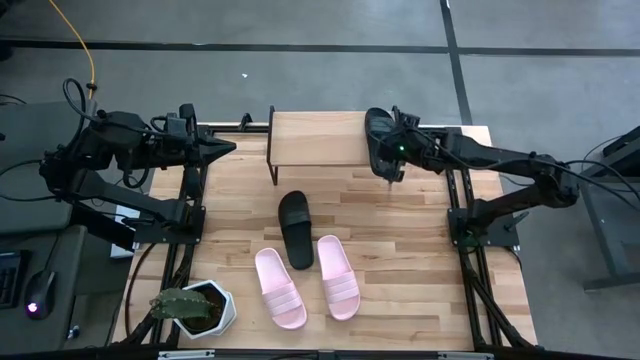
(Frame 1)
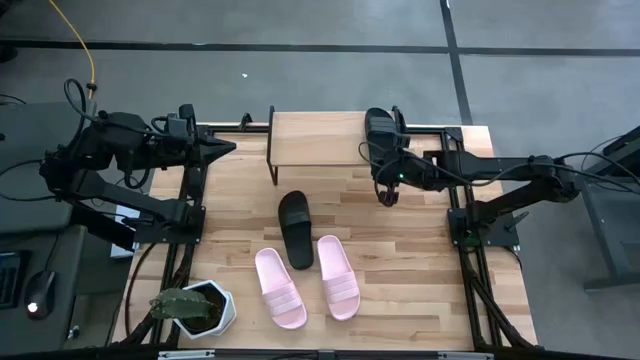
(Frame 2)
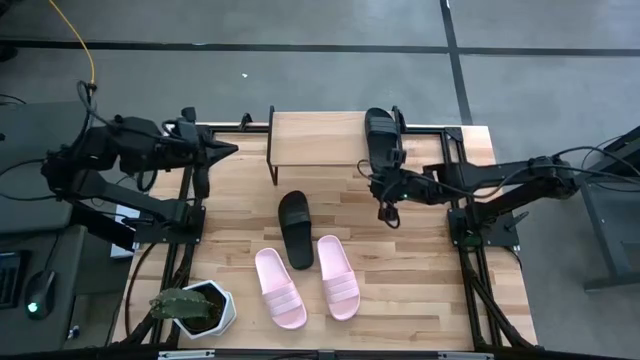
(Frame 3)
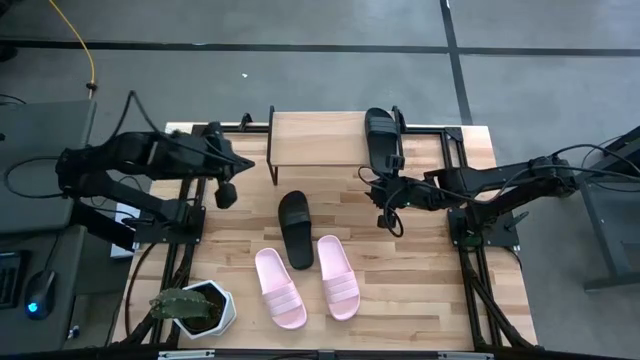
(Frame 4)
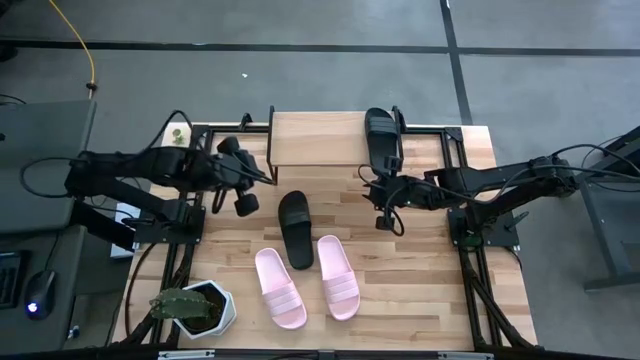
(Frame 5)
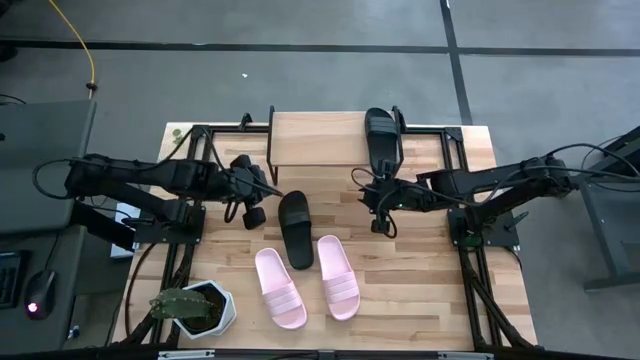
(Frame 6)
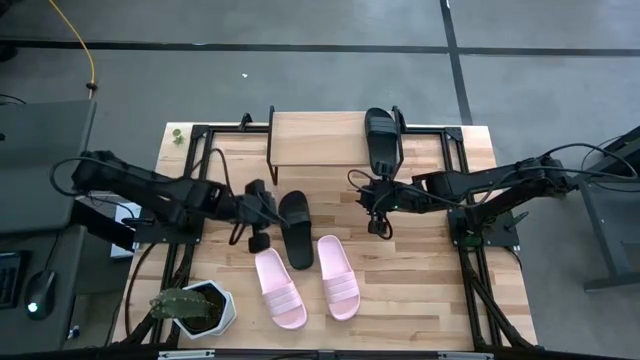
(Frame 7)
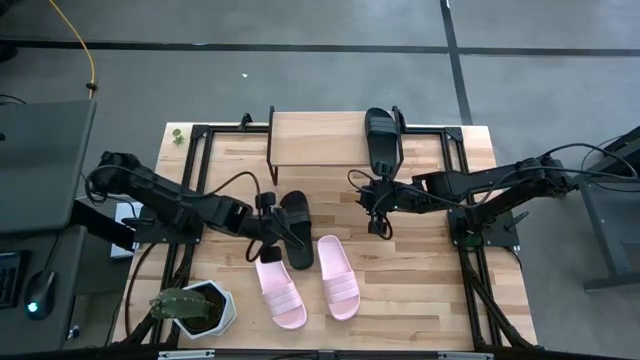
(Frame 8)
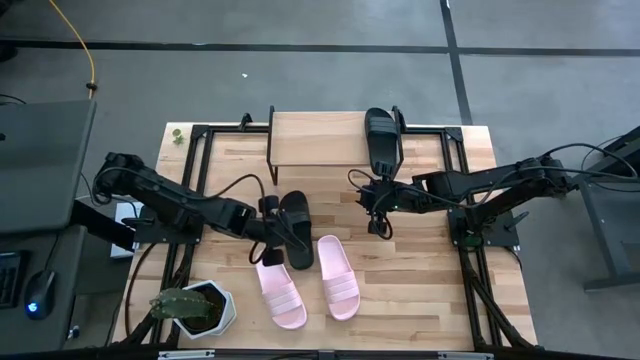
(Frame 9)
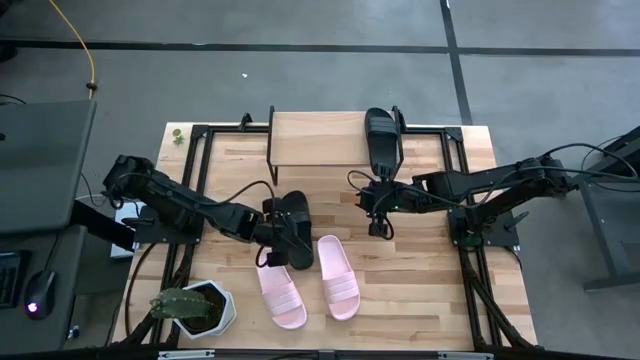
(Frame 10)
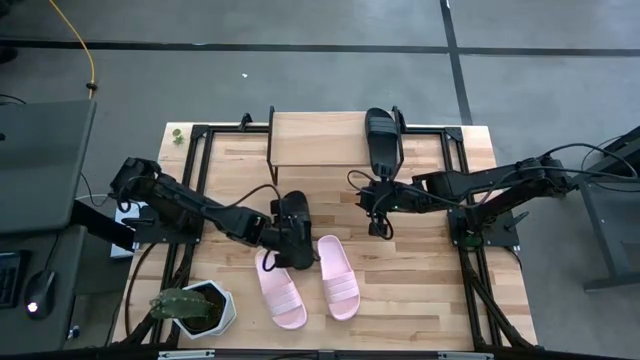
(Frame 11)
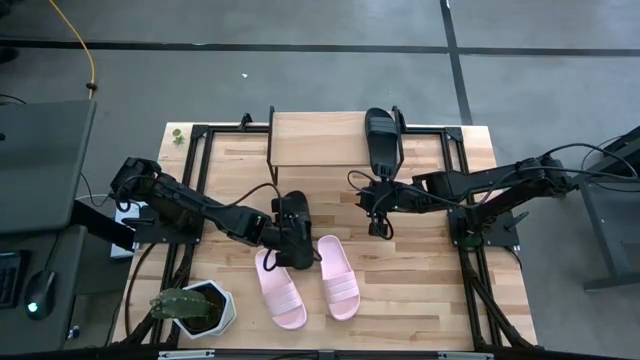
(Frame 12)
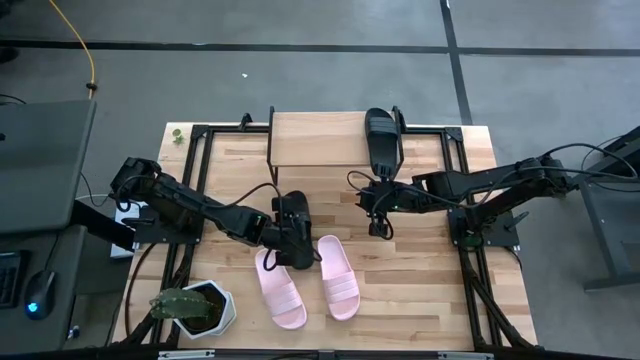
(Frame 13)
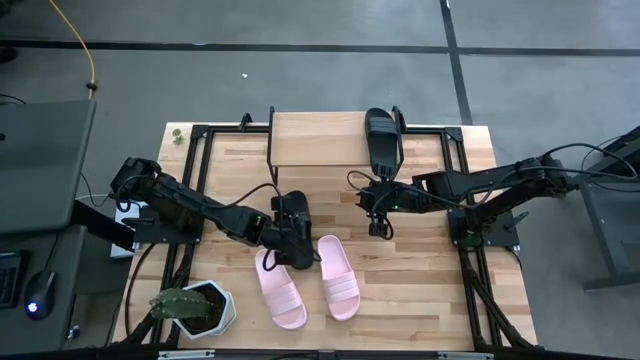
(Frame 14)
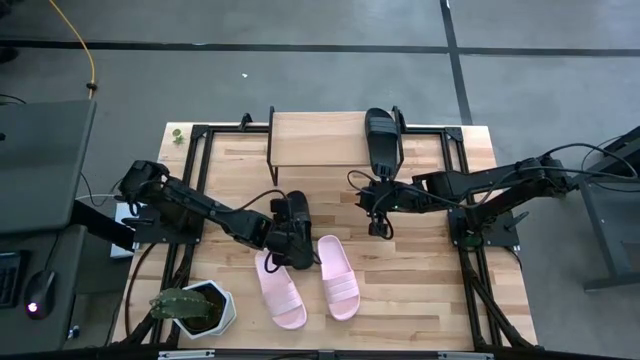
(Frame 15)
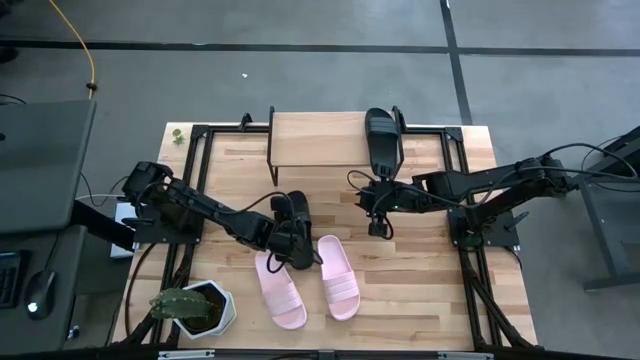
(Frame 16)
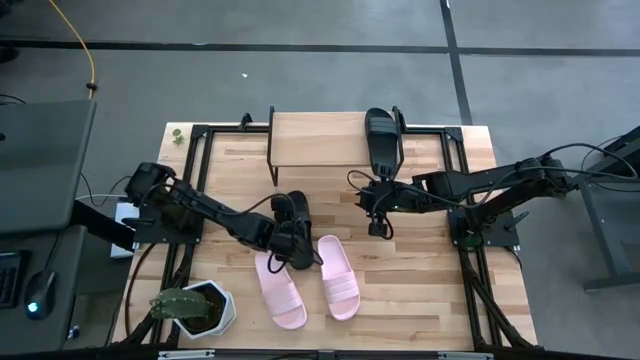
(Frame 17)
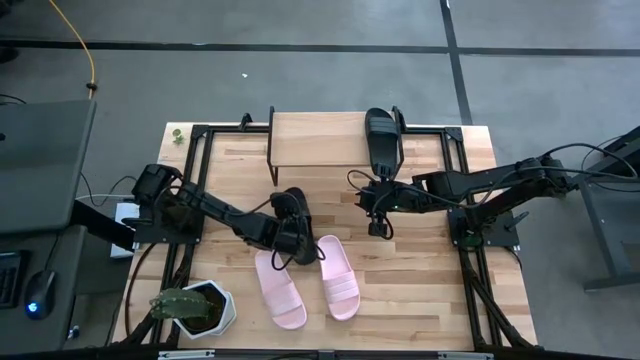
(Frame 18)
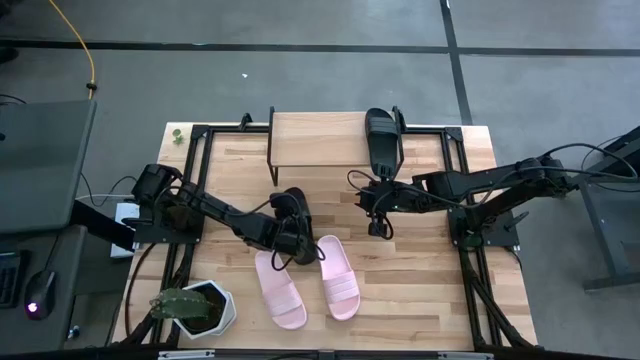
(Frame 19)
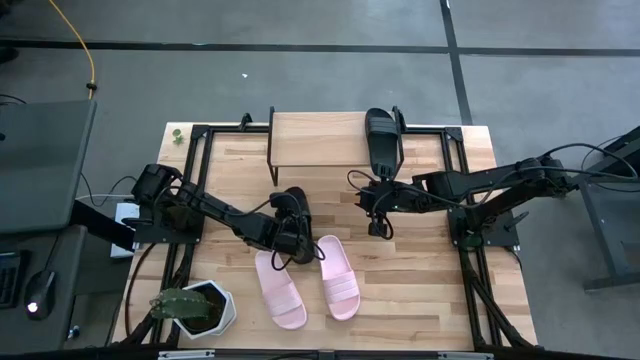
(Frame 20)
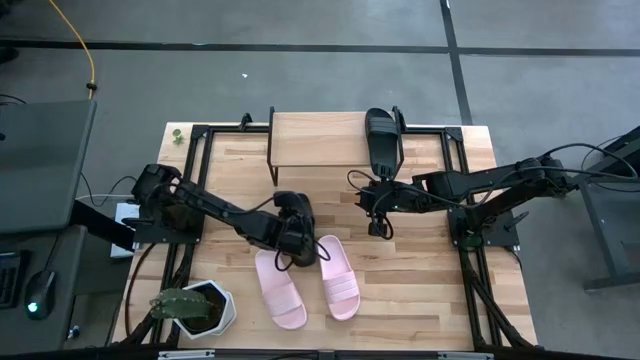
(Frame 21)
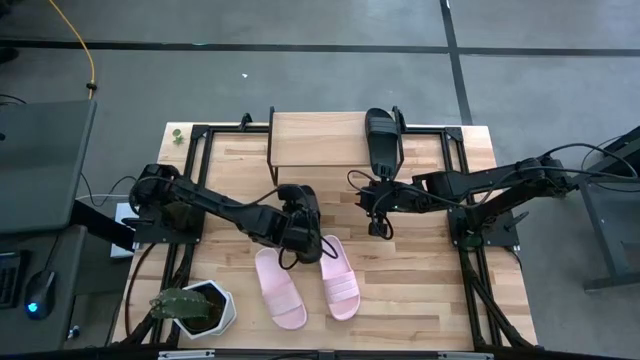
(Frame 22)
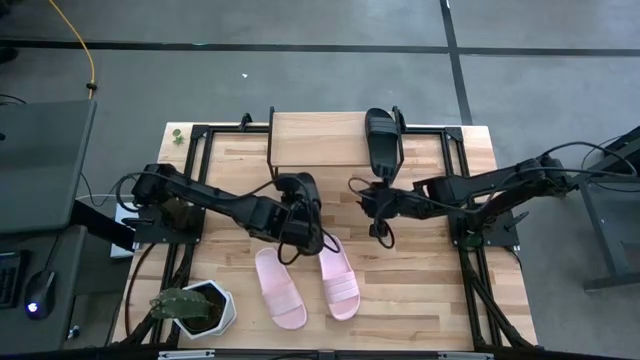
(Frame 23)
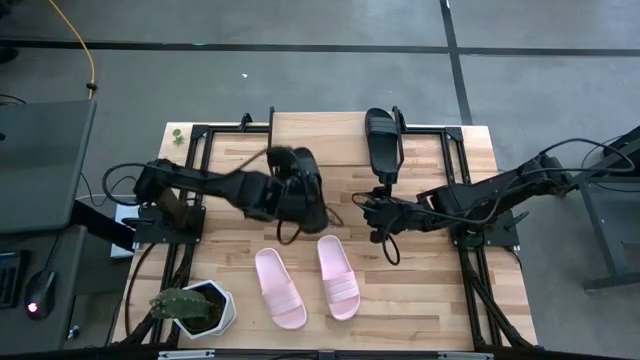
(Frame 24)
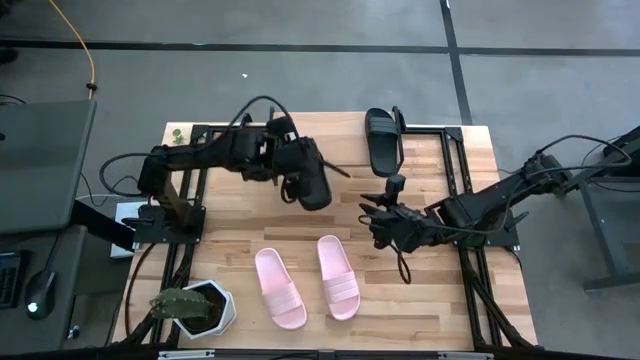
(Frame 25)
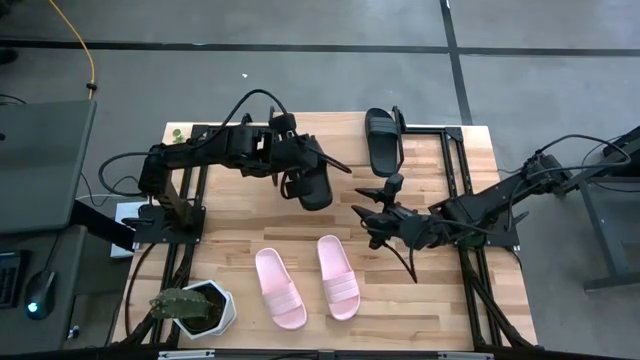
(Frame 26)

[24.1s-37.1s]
Task: Pick and place slides into the shelf
Put the black slide on the shelf

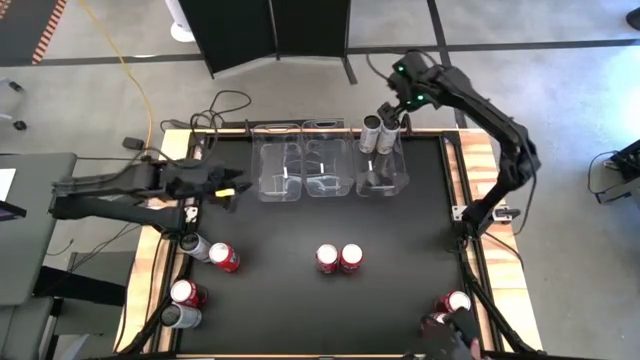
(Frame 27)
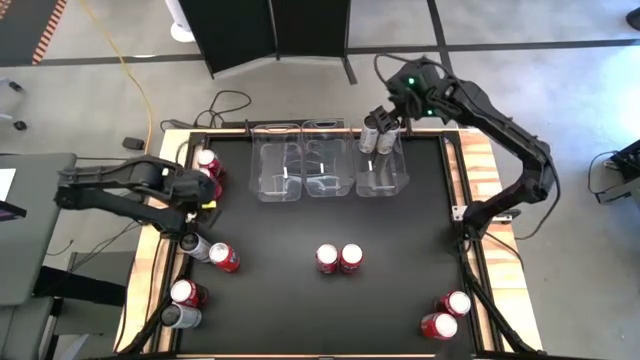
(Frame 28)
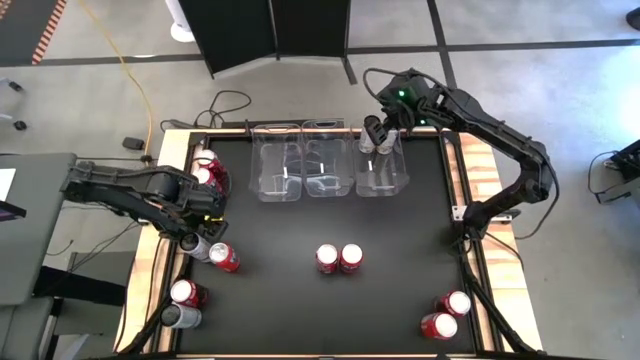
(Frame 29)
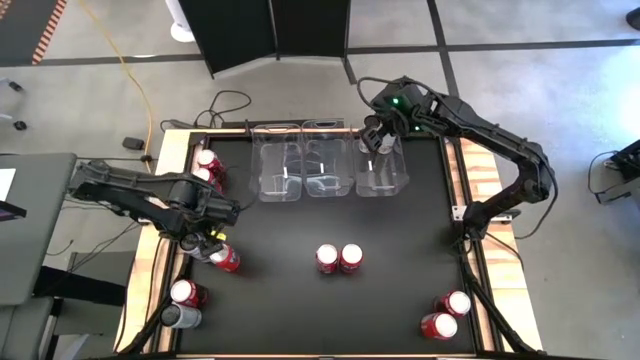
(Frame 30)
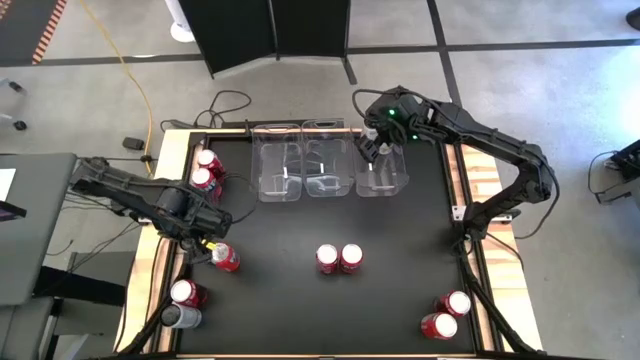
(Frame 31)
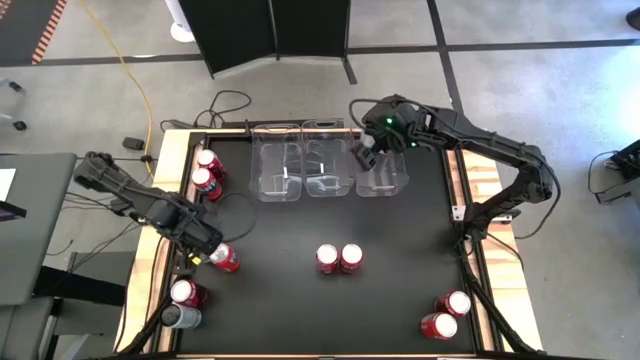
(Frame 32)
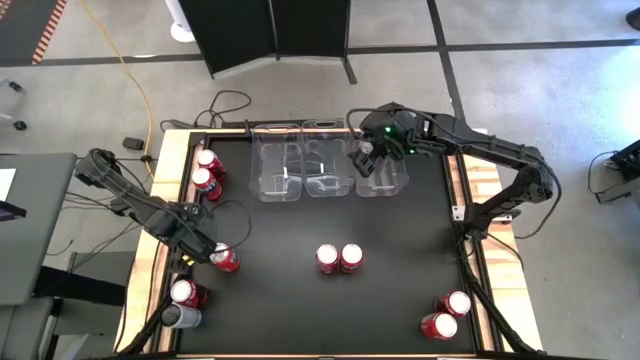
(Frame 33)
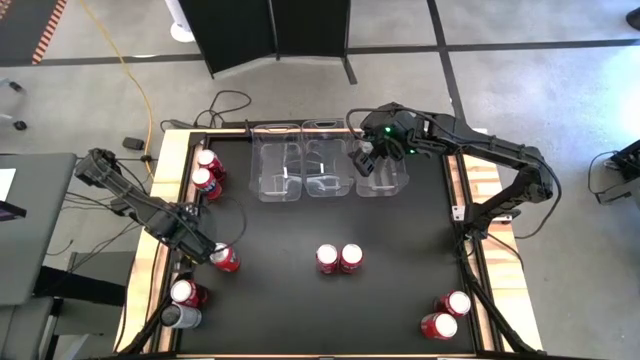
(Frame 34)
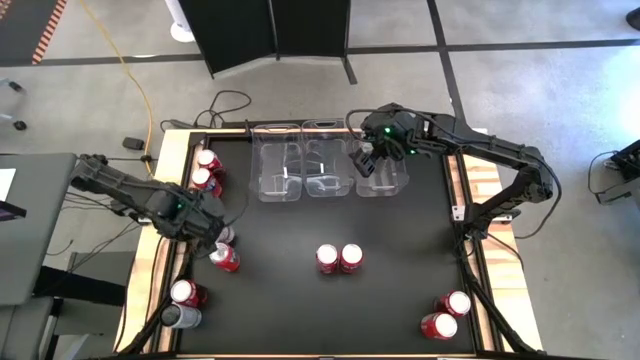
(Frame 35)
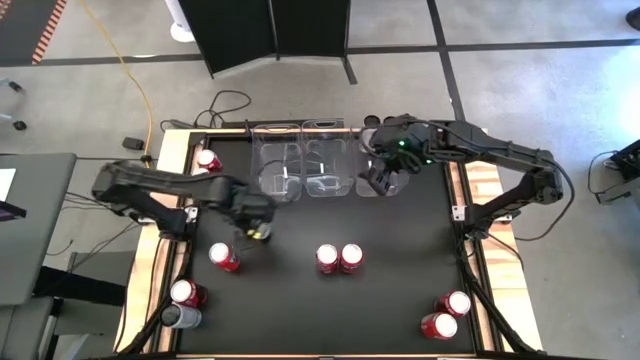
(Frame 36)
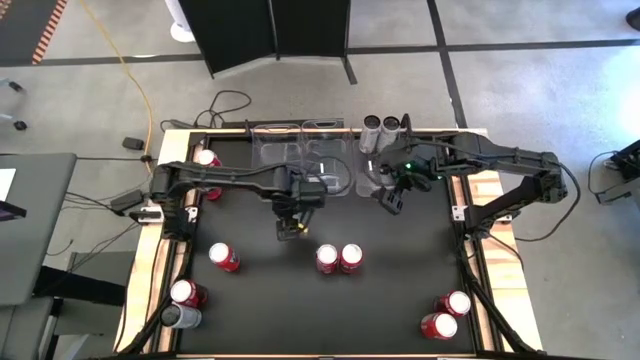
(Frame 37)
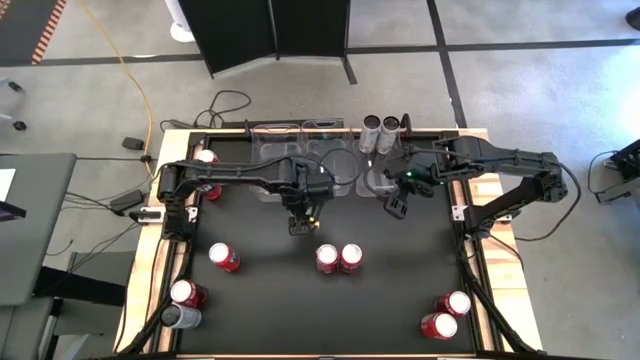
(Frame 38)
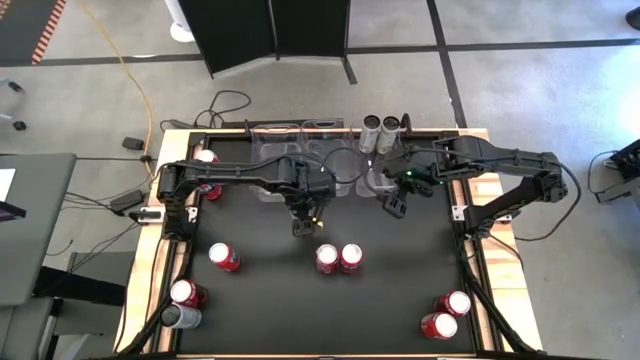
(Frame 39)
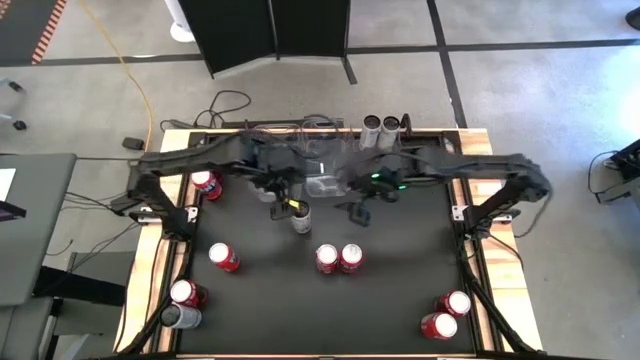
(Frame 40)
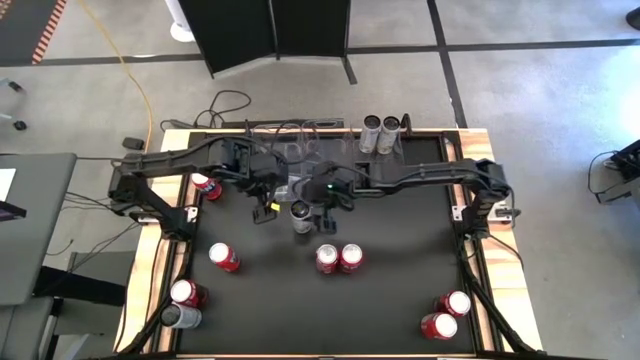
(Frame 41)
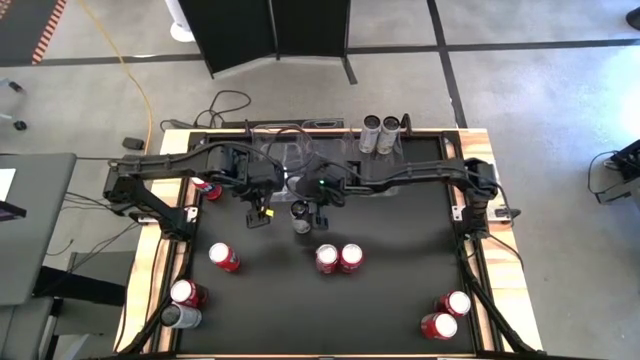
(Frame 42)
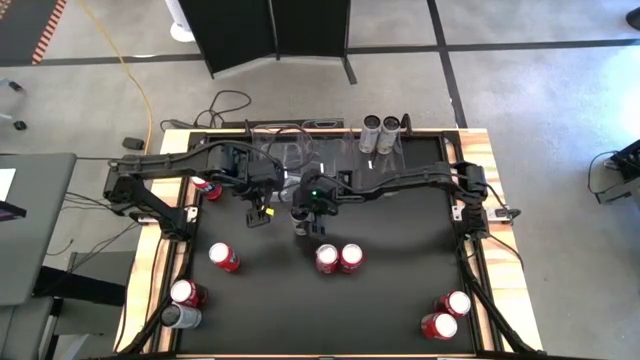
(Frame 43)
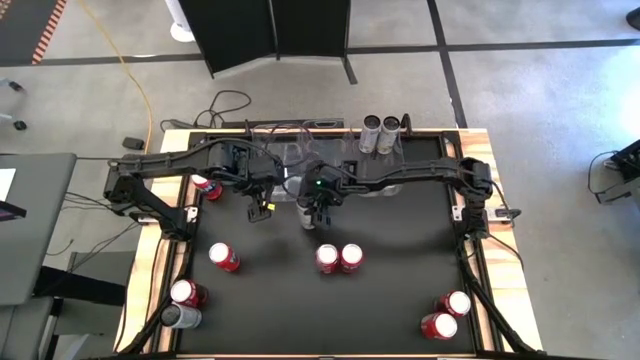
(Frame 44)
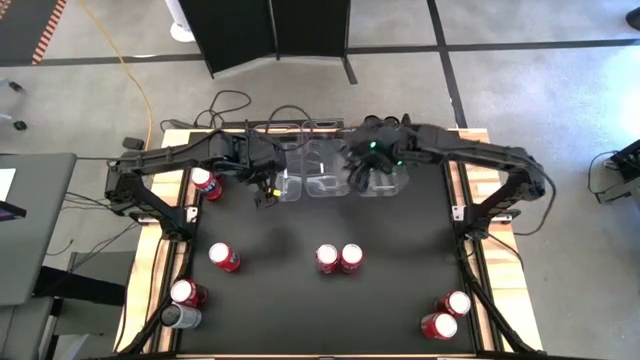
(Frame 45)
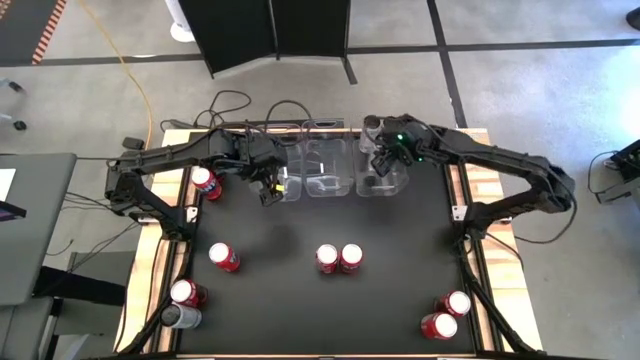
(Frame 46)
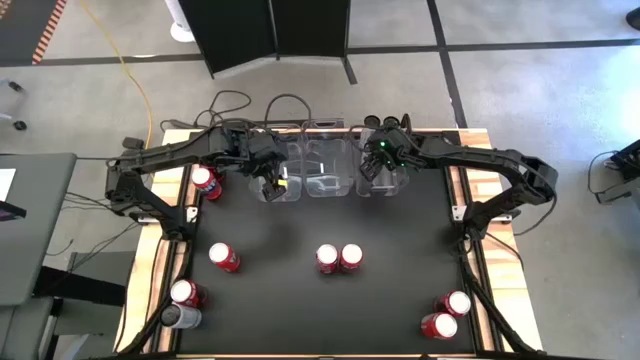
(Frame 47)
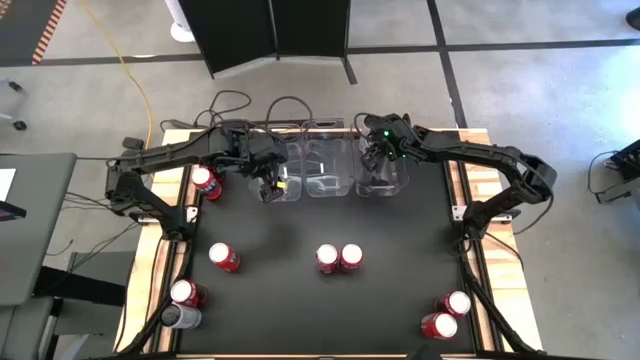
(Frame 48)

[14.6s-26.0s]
Task: Sort soda cans
Put the top white-yellow soda can into the right transparent bin
